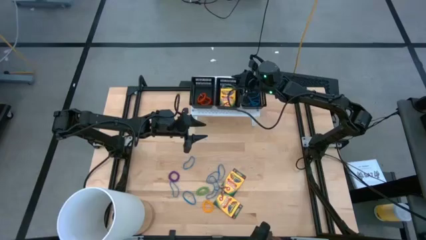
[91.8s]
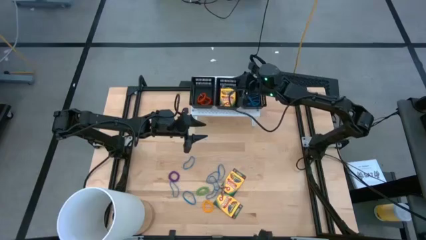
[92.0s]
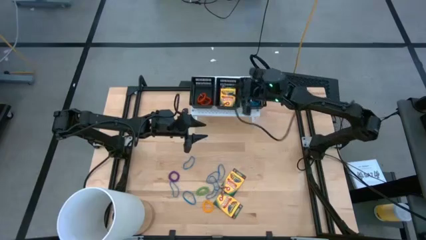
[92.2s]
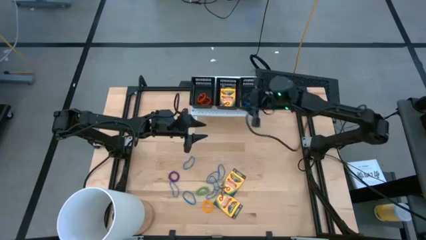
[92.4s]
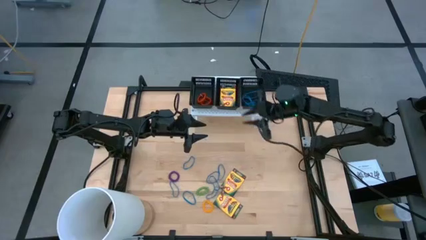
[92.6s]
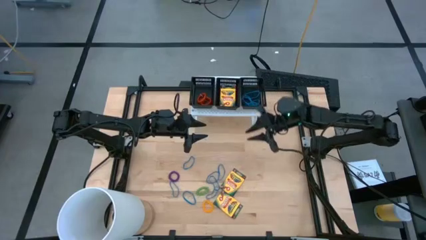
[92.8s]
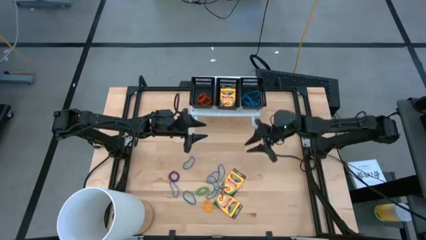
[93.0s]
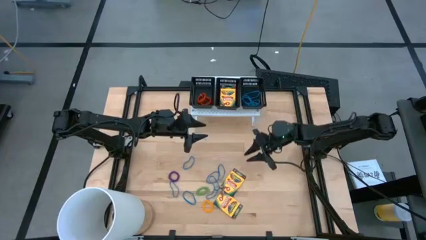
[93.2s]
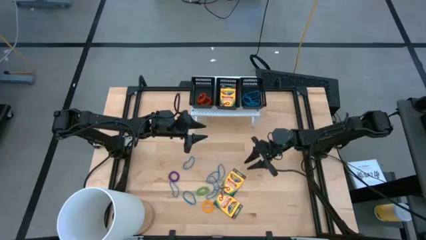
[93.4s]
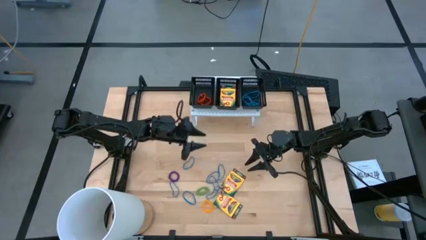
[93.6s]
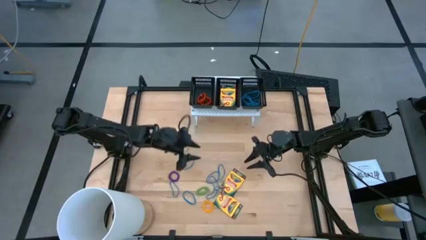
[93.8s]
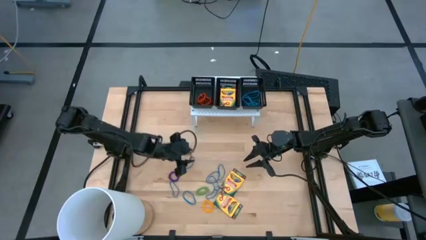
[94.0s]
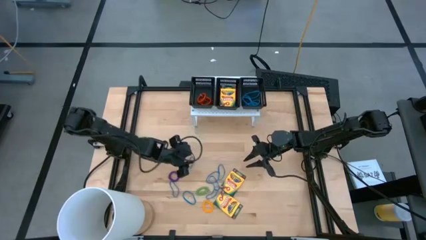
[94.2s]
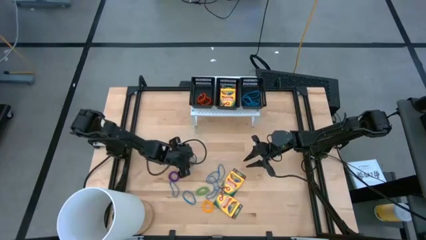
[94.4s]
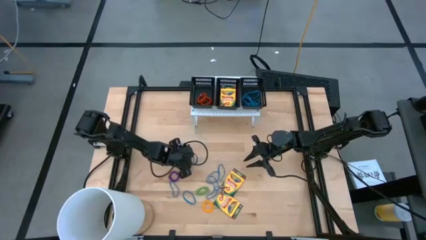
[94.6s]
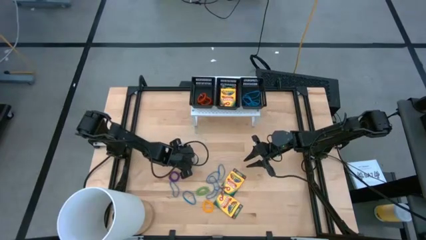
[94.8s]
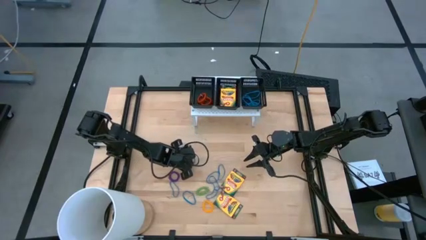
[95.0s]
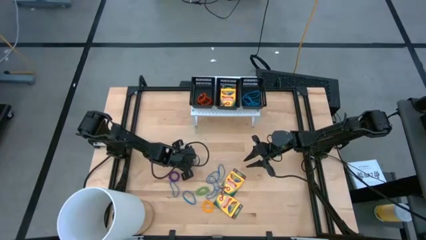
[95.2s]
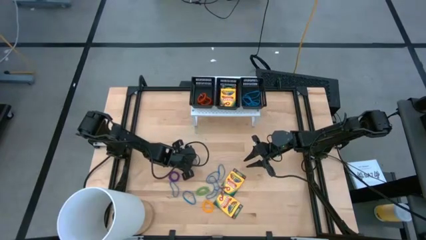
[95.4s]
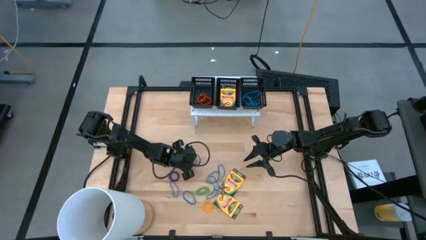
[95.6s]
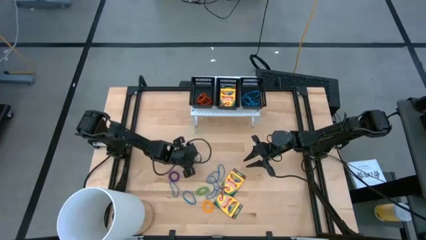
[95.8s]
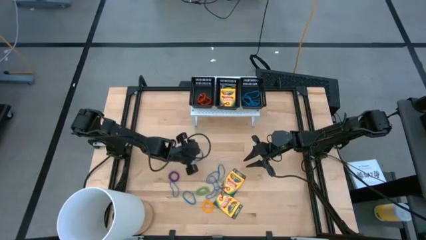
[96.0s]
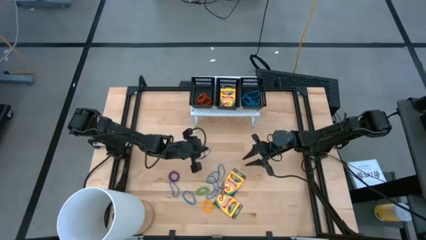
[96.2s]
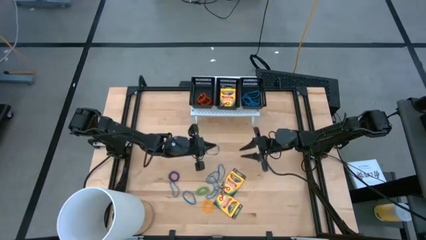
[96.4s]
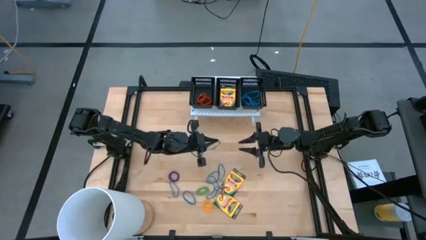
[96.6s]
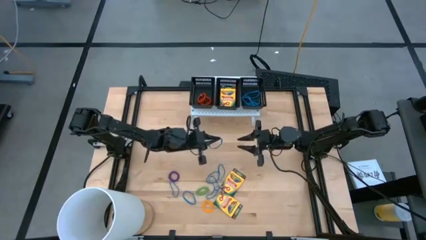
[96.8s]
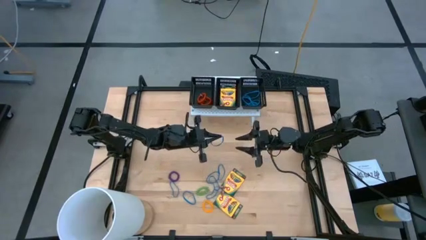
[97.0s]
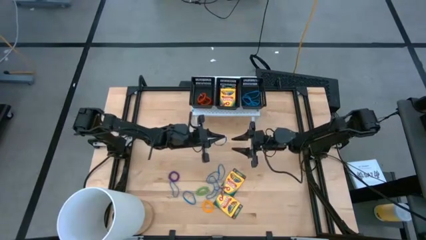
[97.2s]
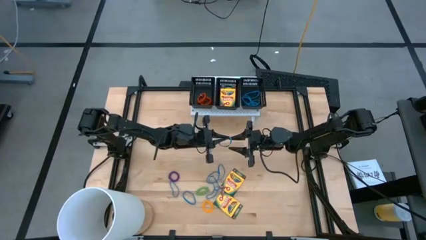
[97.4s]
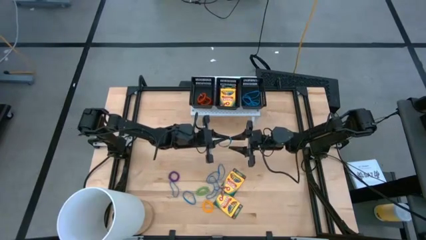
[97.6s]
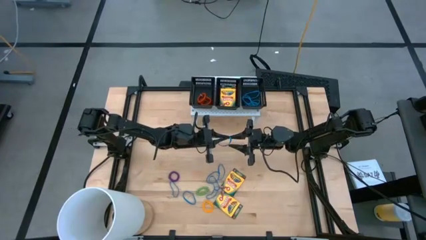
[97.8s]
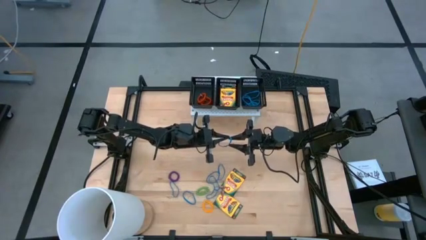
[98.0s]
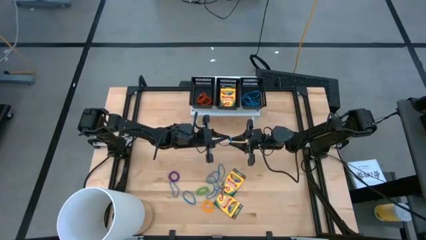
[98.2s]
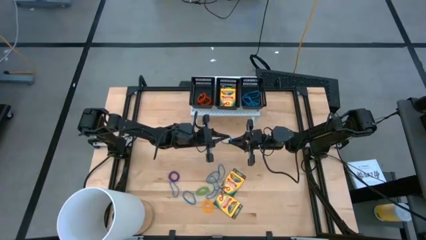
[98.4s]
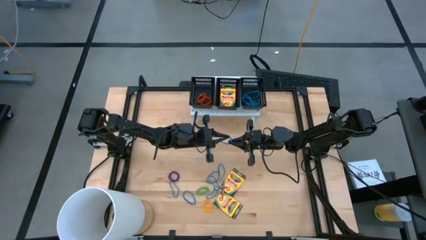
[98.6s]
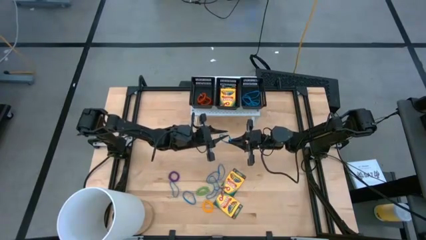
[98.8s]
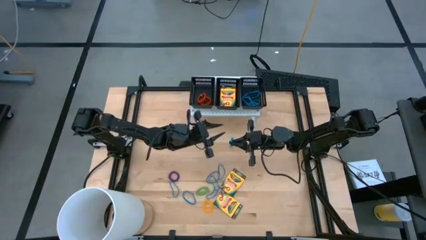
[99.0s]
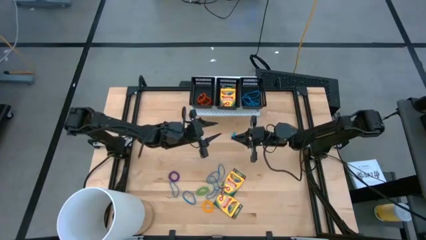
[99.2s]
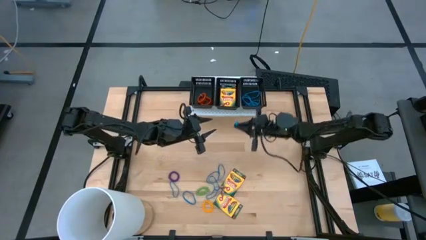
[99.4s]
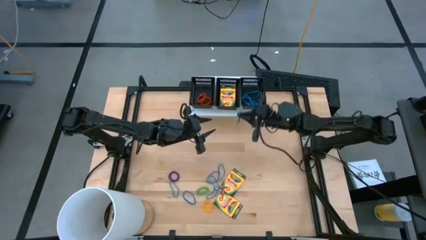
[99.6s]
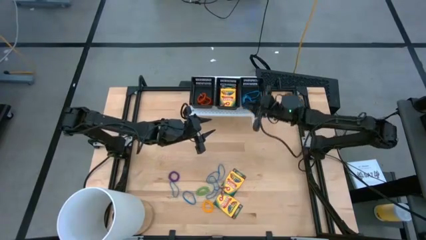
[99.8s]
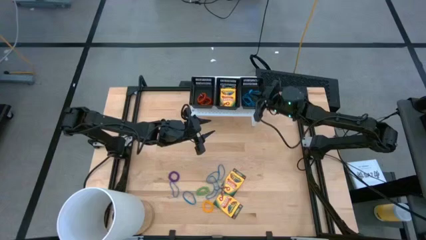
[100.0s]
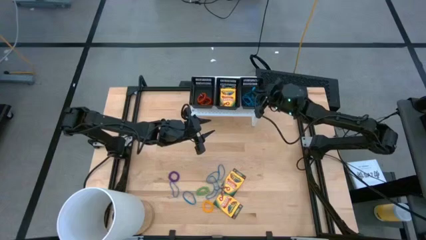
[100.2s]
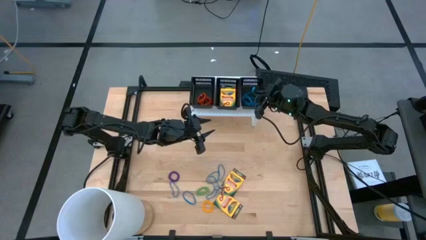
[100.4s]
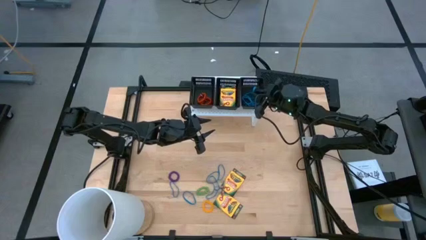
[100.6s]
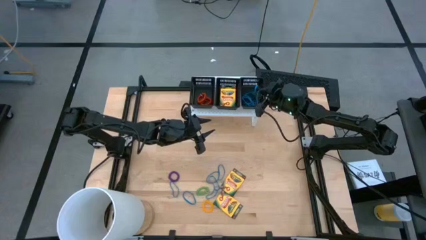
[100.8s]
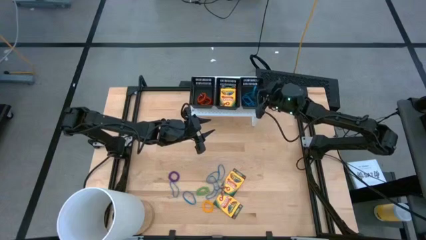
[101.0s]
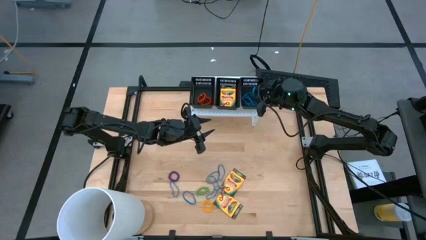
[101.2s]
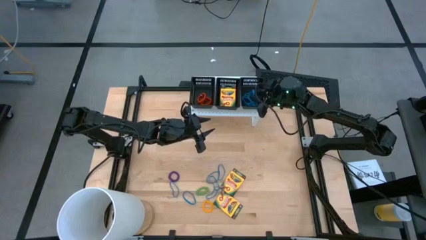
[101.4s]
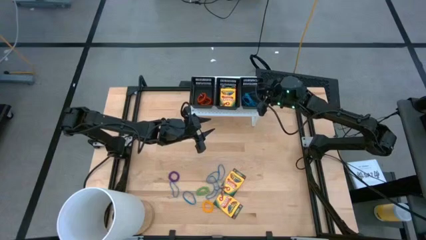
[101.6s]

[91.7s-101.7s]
Task: Pick & Place Office Desk Supplies
Put the blue rubber band into the right black bin on the shelf

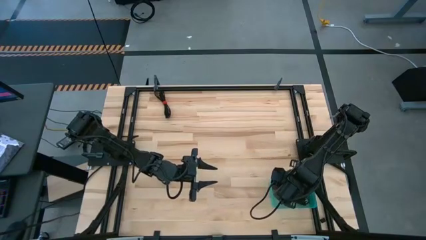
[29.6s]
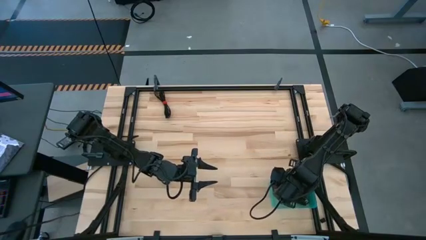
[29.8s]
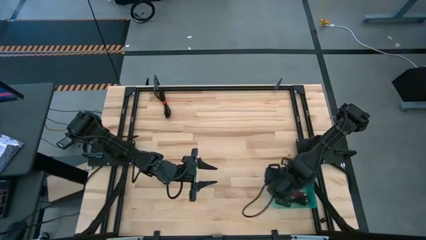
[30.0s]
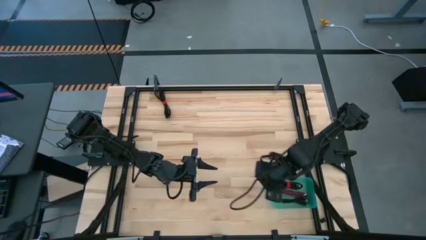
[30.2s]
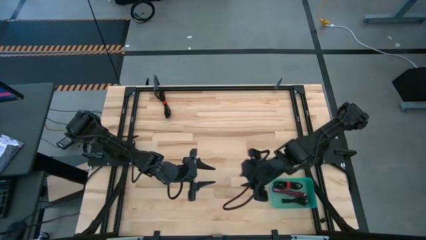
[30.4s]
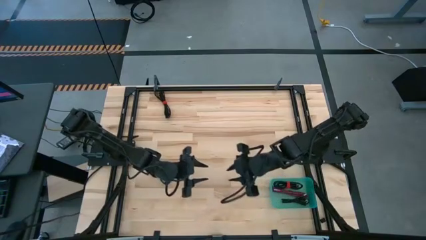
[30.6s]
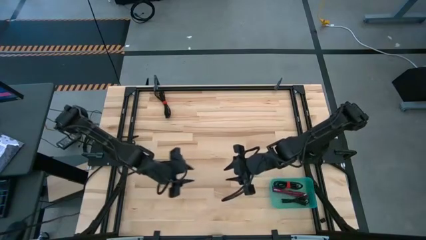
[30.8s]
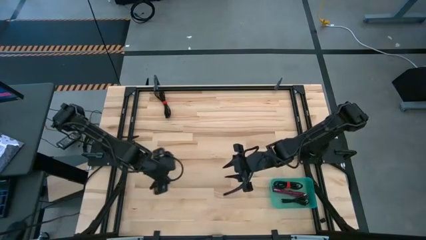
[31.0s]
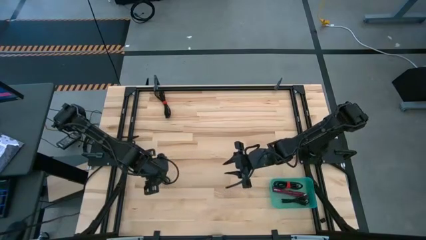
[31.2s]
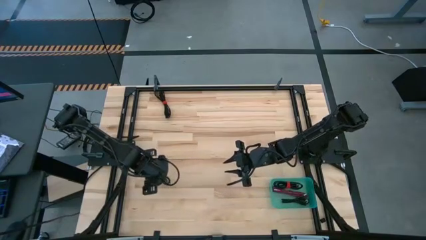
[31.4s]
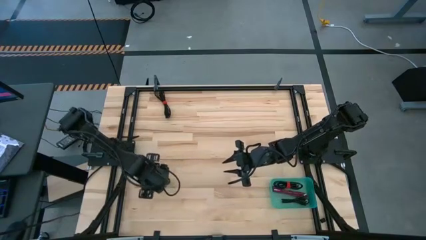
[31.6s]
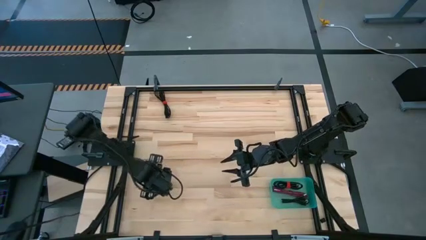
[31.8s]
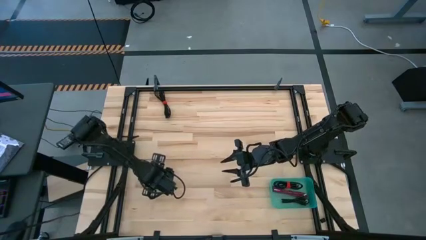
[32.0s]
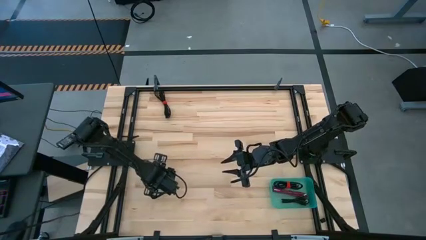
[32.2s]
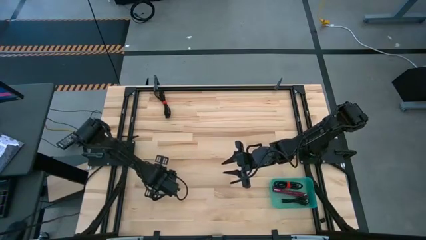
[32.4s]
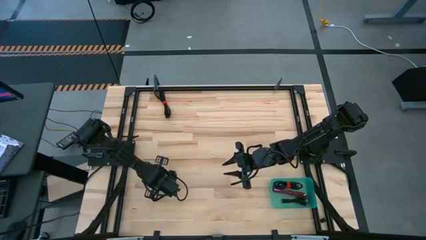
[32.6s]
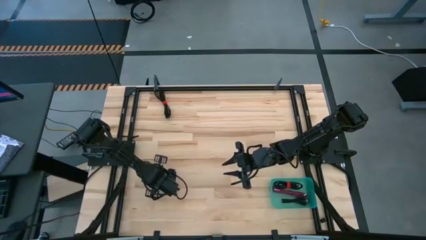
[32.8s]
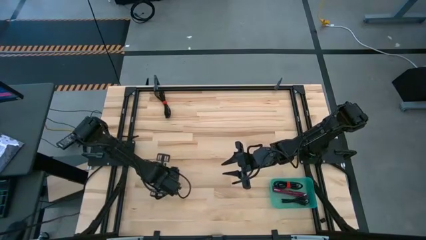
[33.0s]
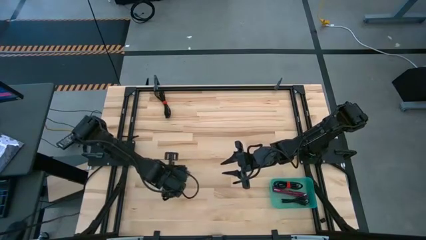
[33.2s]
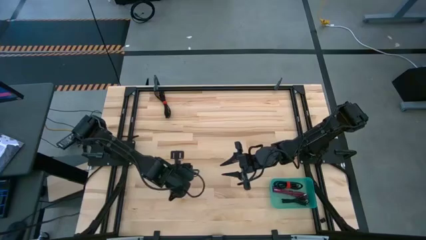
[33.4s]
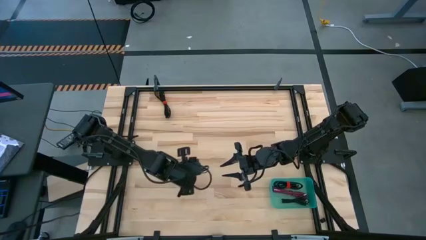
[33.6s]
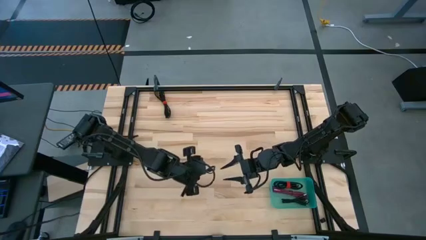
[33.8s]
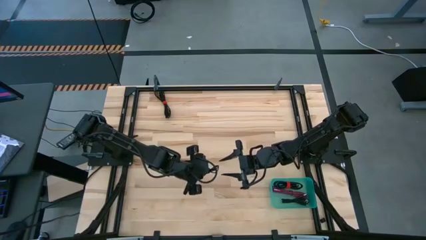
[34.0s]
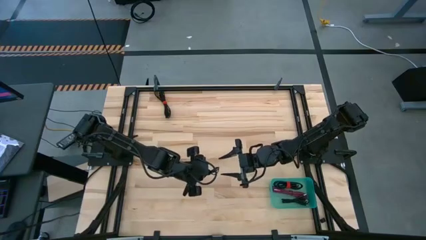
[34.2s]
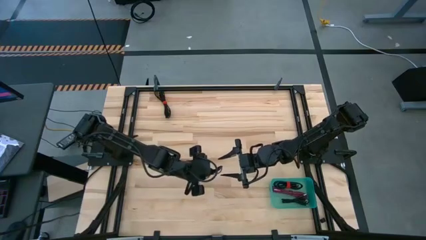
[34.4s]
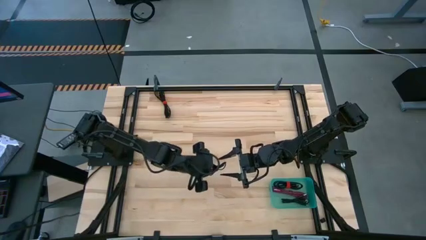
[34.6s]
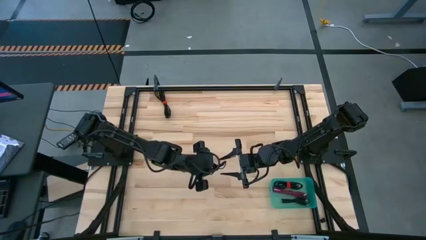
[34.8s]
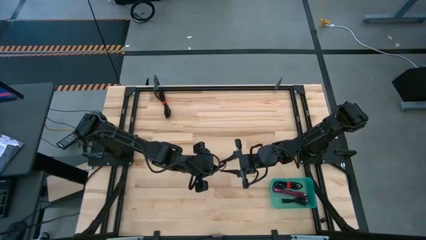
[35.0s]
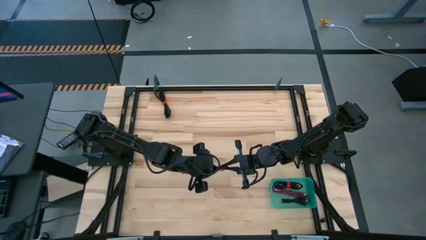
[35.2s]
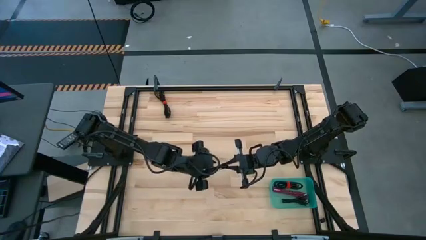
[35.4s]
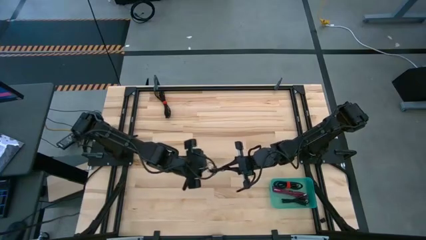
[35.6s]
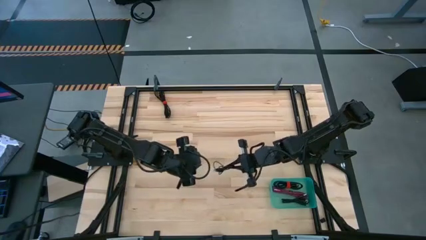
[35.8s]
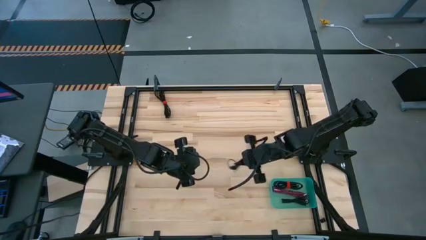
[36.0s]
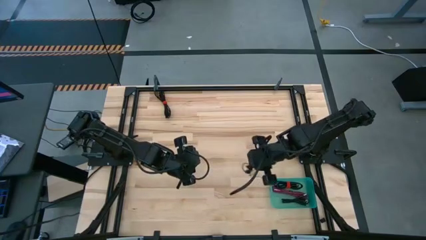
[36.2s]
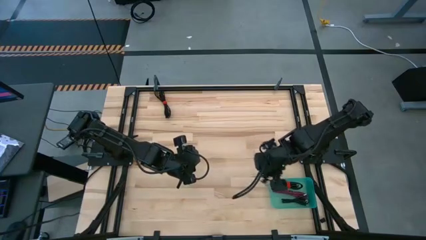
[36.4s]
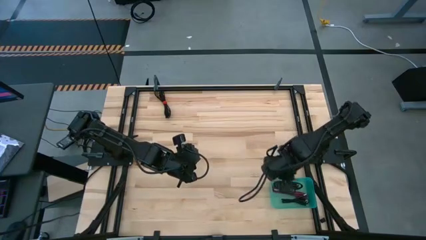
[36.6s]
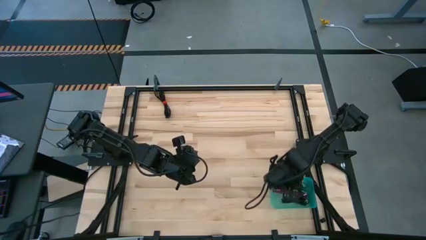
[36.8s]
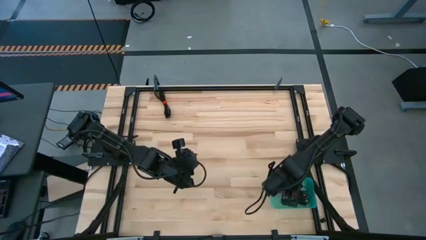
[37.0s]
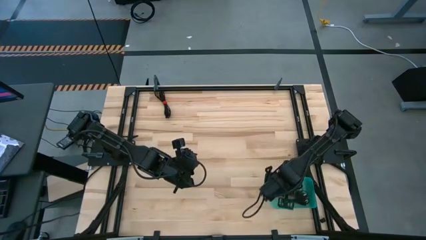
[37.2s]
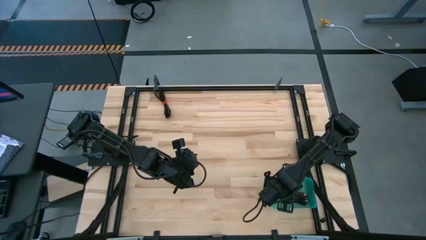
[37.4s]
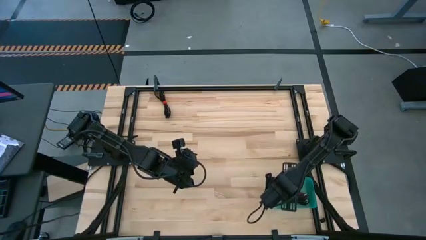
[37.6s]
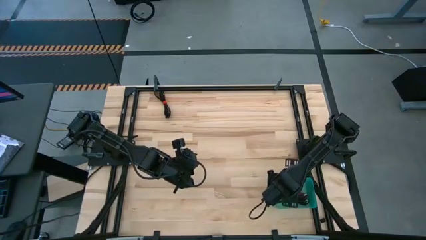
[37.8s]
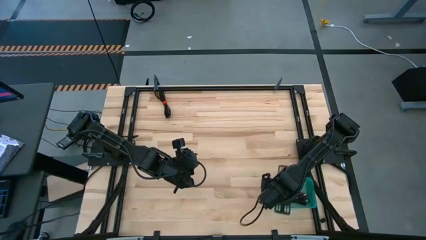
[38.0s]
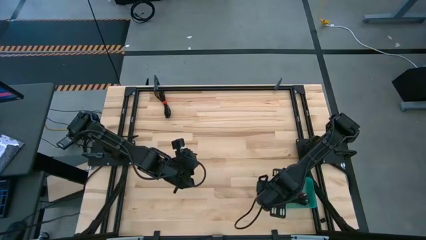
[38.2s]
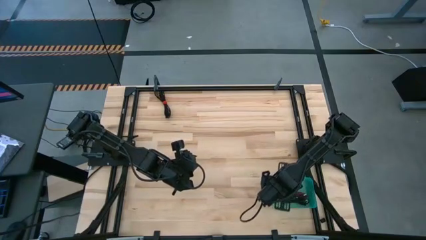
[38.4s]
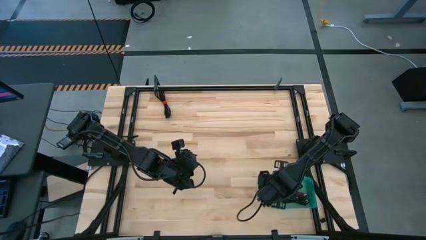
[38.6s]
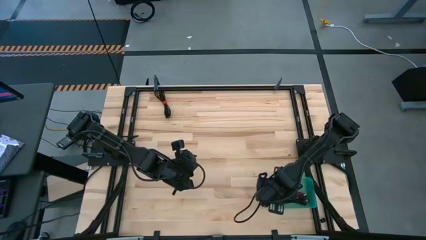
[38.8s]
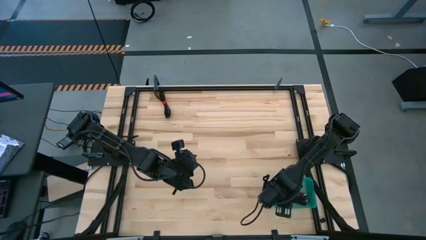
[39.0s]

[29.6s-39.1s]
Task: Pick and place USB-C Cables
Put the black charger cable into the green bin
